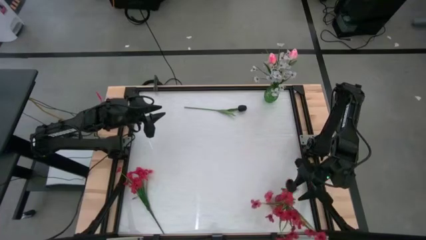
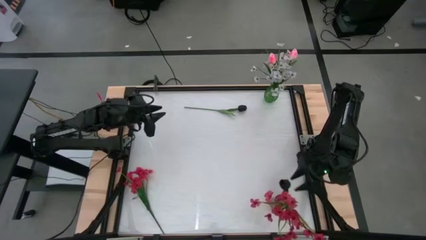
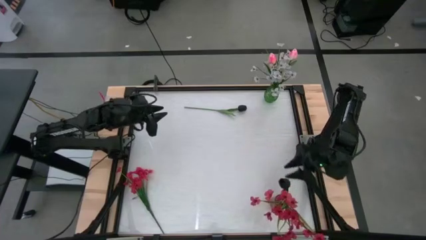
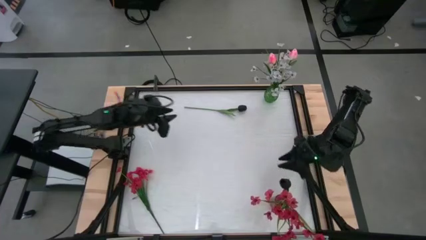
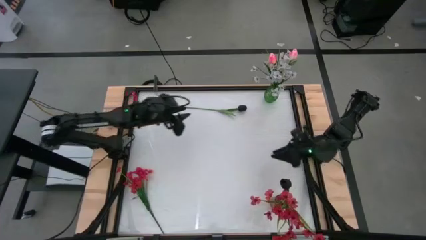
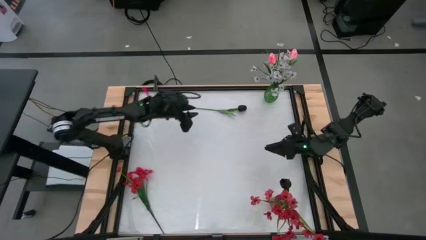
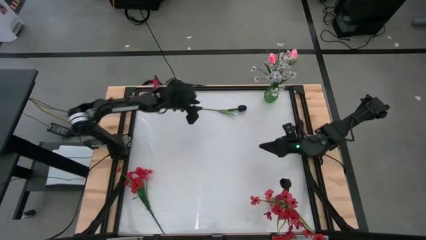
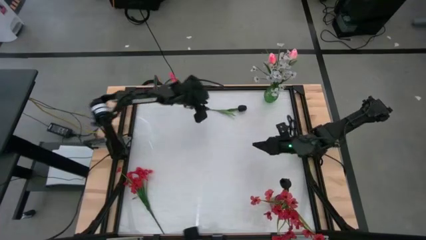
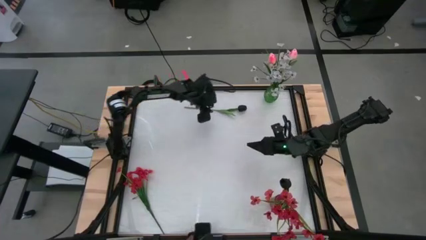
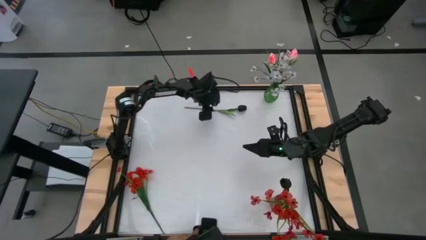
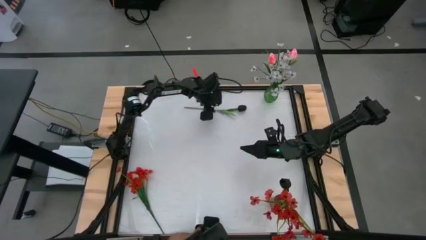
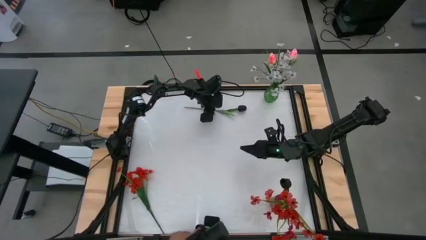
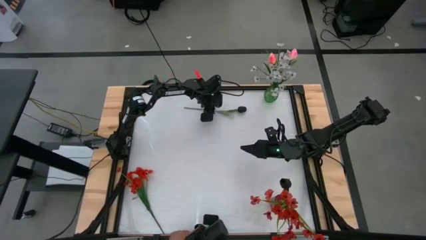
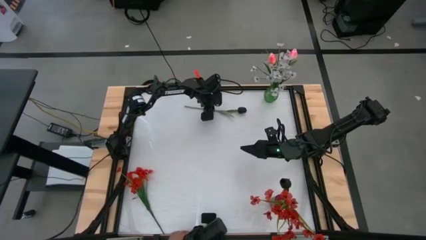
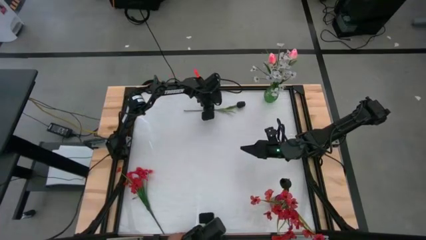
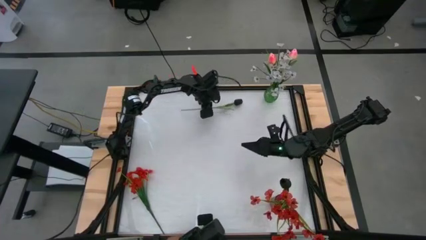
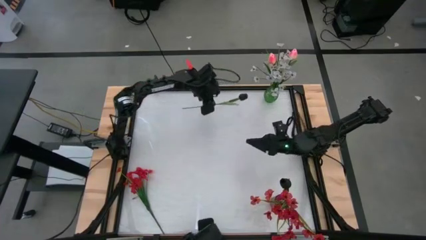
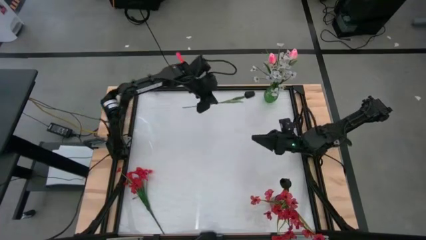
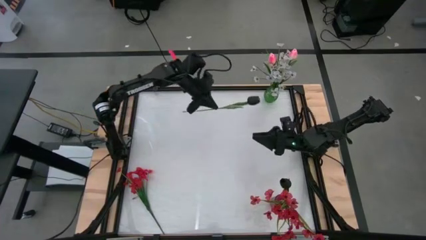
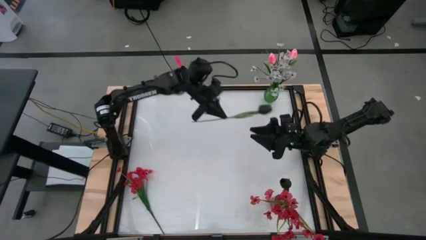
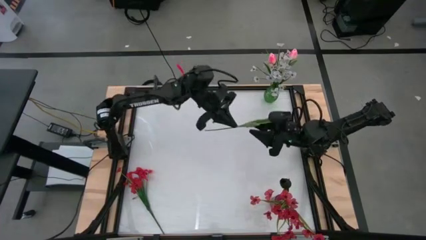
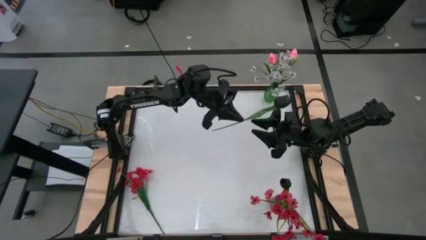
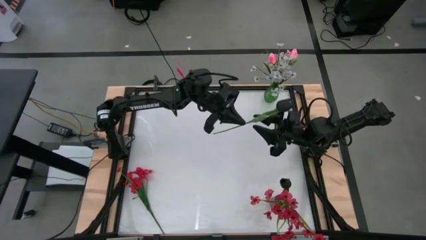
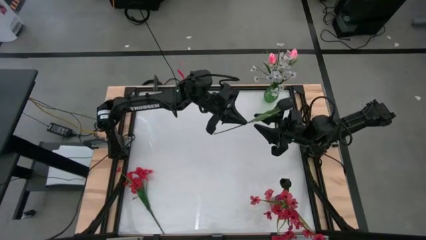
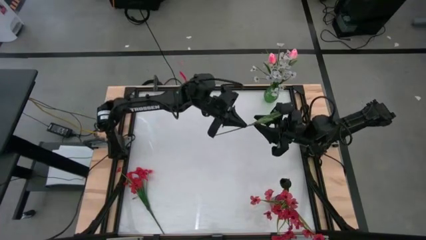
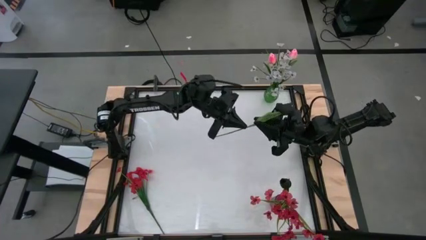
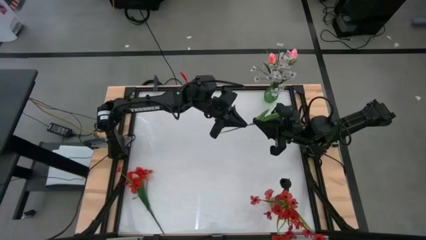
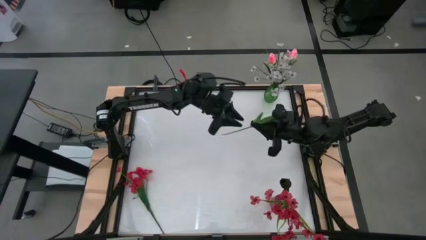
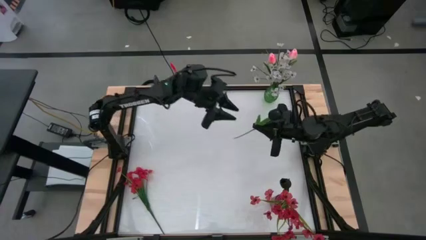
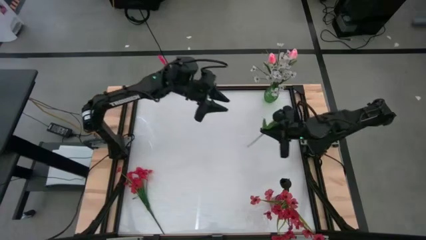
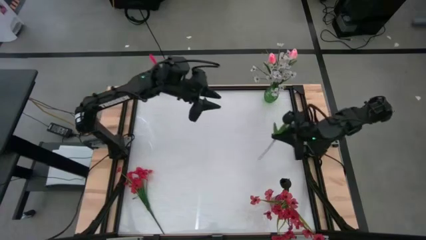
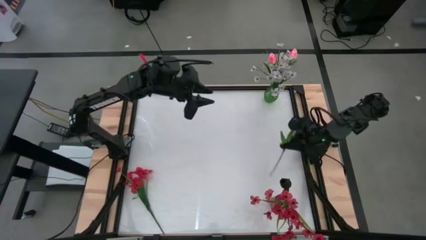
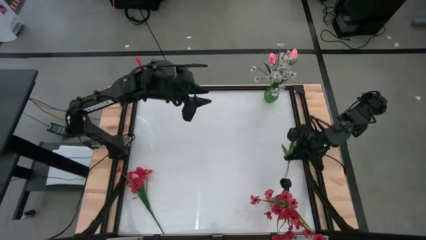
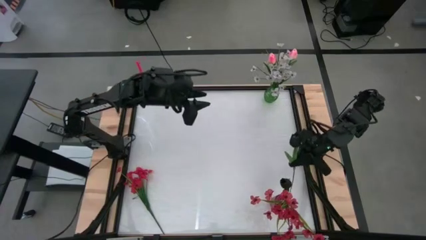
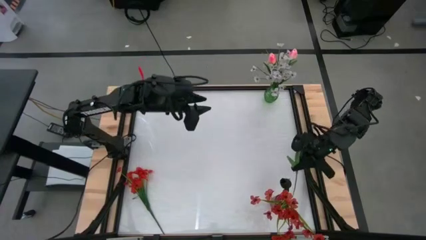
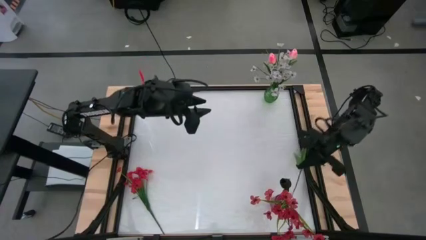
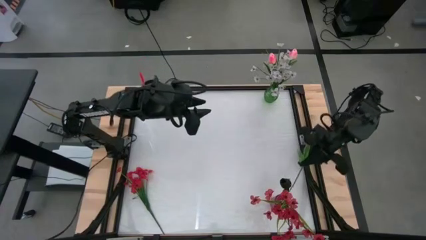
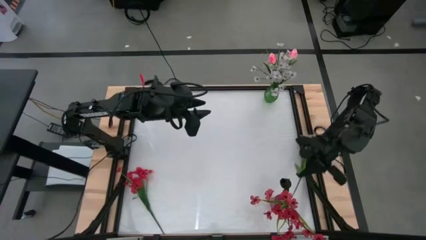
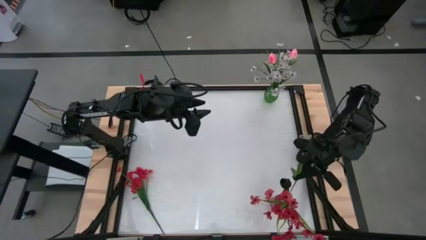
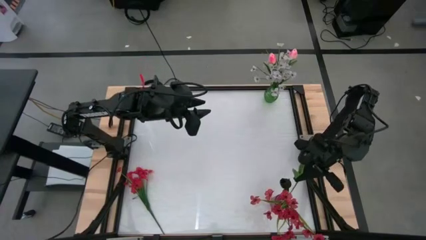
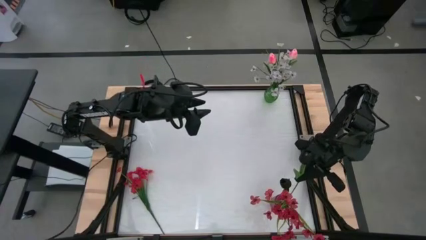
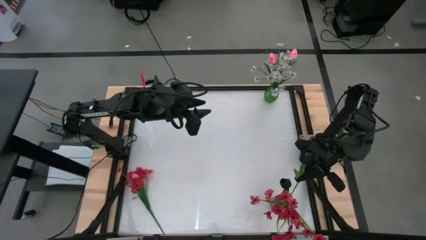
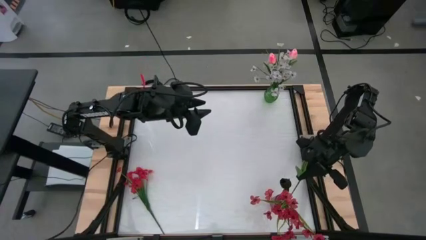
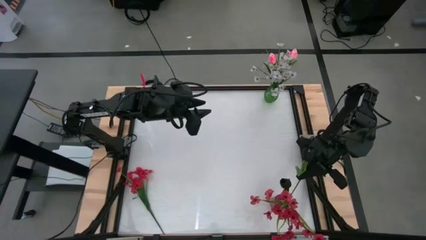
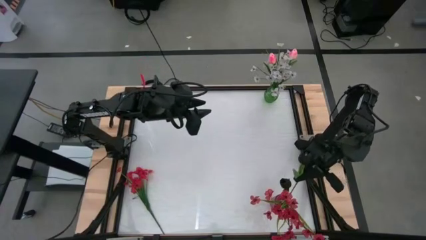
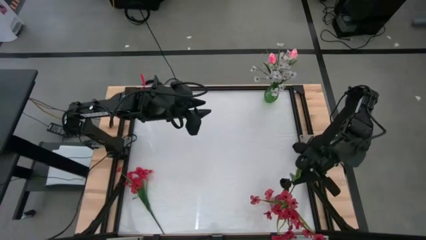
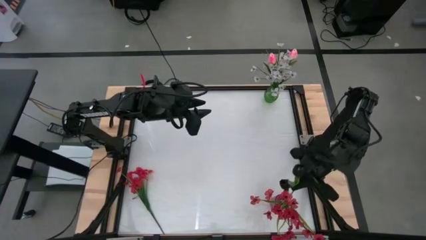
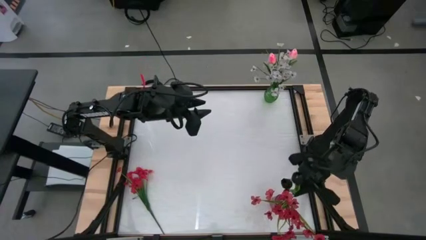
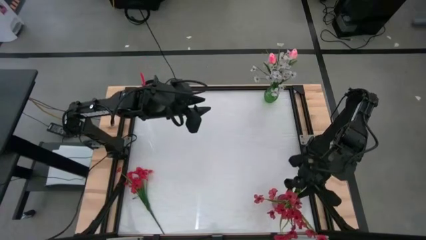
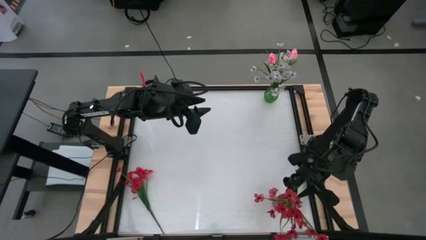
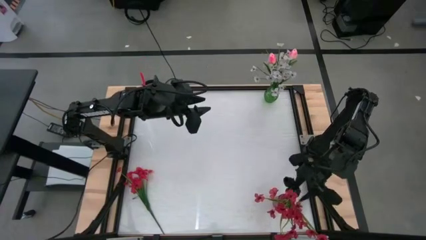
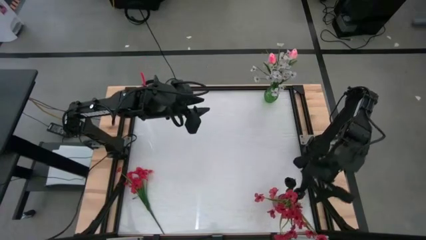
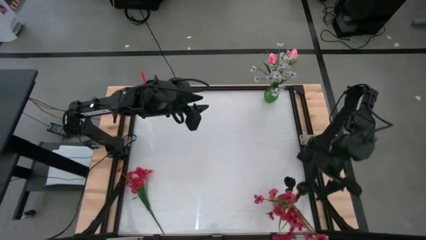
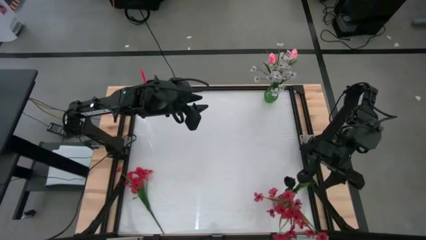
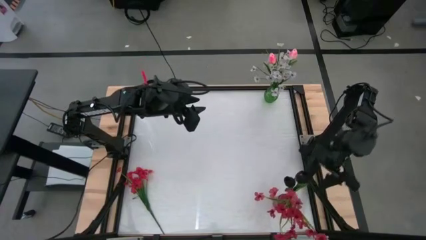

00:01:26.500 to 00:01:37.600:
Task: Sort flowers into vase by color
Put the black flower into the red vase
